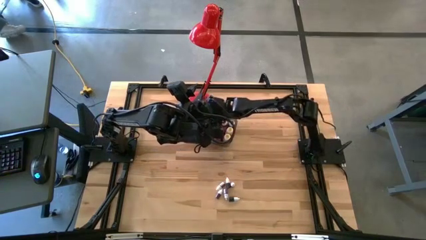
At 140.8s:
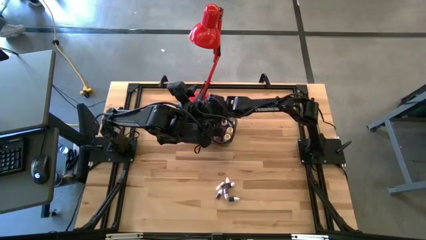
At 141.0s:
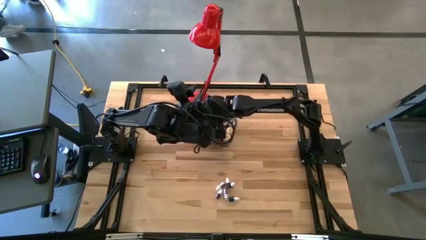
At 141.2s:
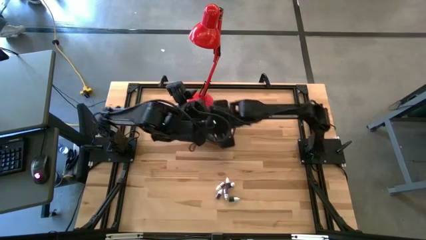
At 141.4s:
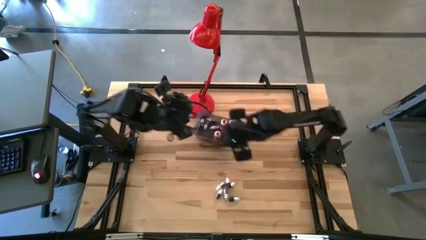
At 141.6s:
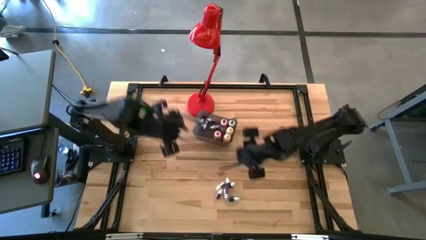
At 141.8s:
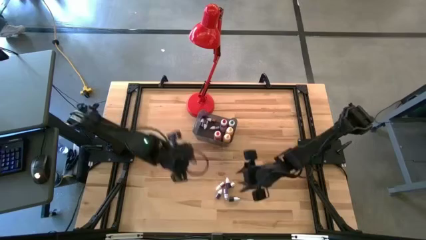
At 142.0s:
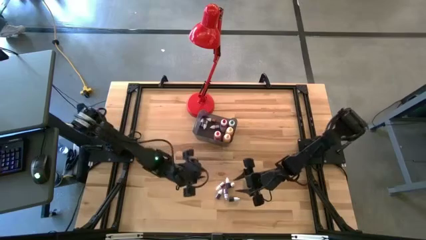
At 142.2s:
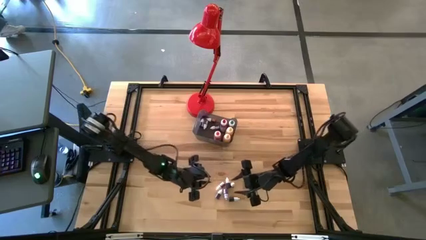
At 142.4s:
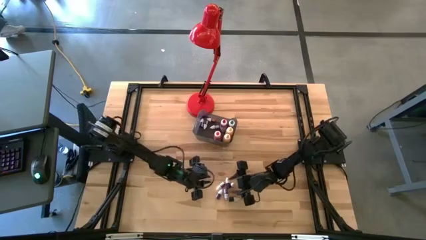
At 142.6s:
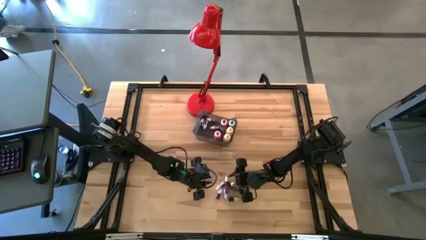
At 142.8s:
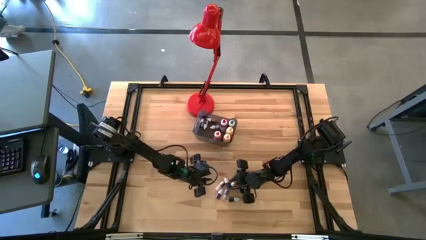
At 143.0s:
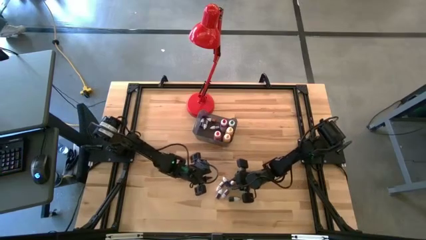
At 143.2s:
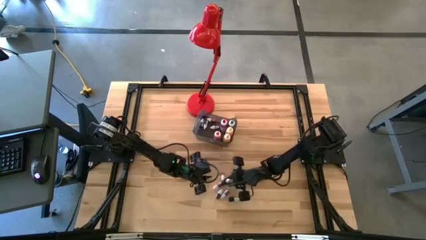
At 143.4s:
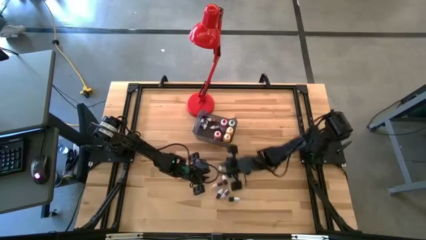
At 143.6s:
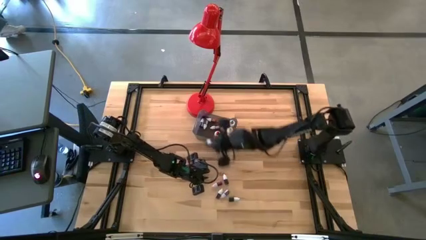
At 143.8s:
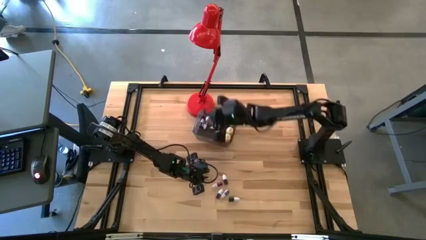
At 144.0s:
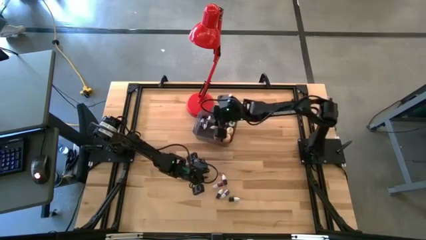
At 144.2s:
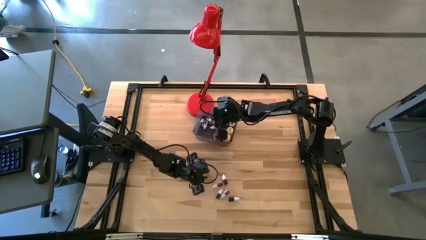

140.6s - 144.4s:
Task: Pick & Place food coloring
Put the small blue food coloring bottle into the black bin

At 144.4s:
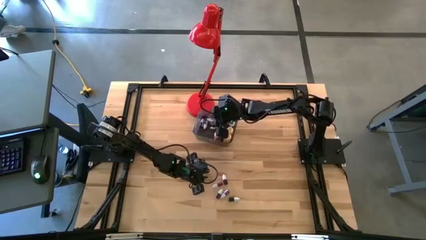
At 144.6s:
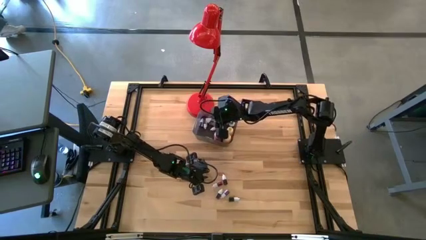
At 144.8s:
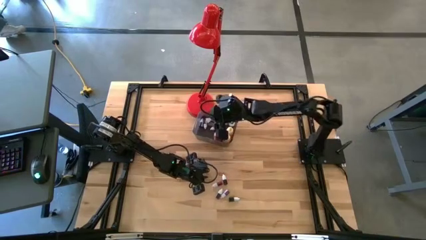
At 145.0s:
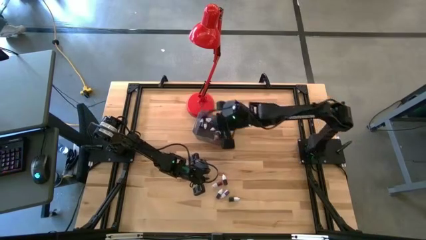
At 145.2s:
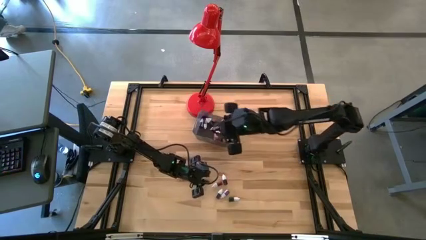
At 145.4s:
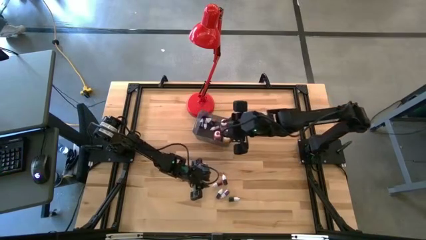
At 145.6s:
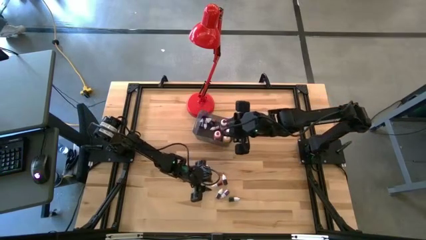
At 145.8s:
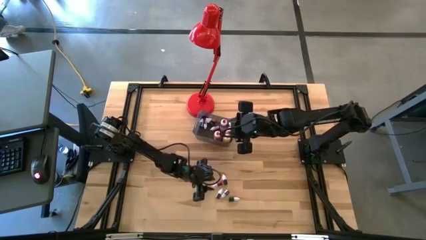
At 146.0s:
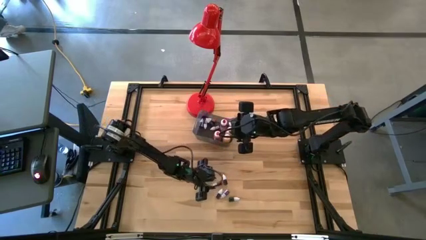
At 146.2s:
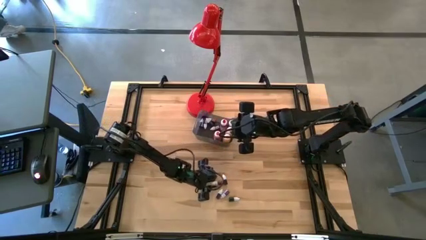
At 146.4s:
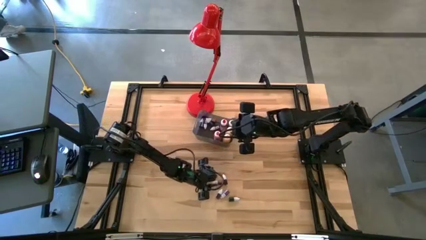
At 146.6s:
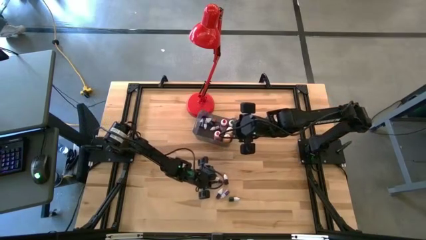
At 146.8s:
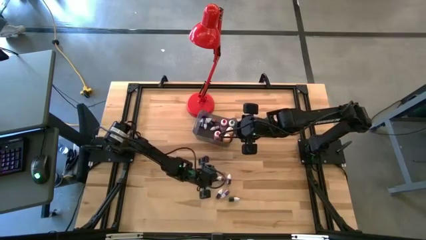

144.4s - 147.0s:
Put the left small red food coloring bottle into the black bin

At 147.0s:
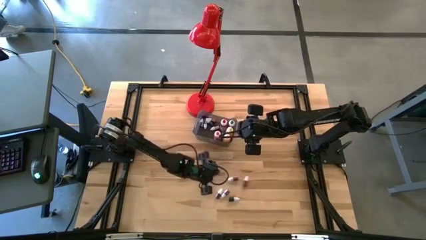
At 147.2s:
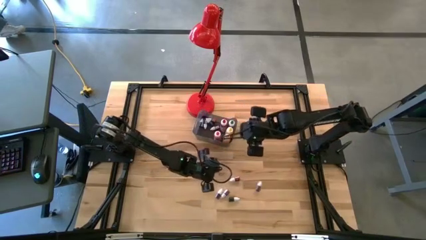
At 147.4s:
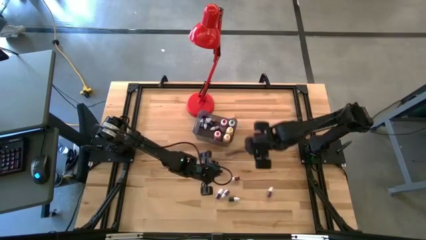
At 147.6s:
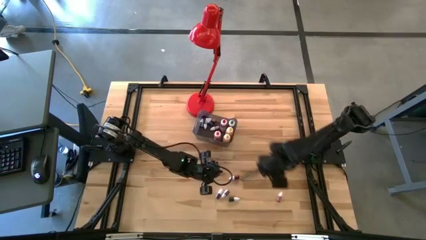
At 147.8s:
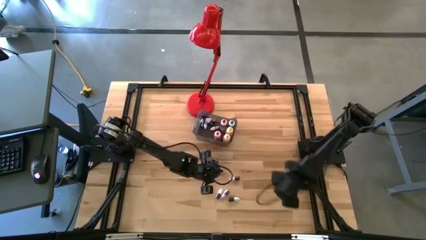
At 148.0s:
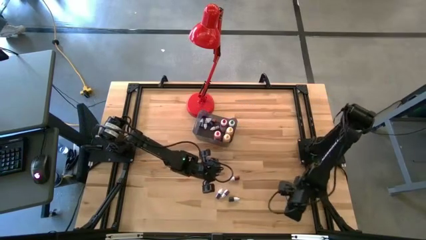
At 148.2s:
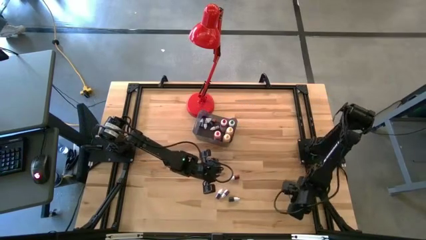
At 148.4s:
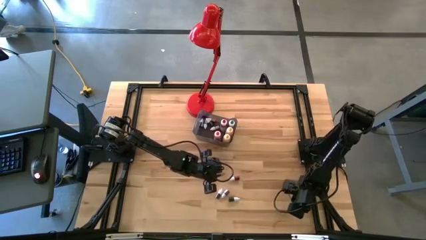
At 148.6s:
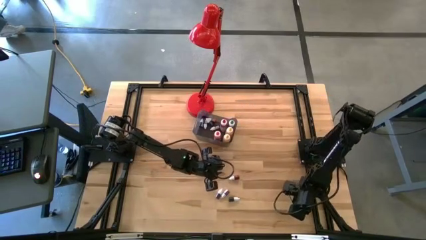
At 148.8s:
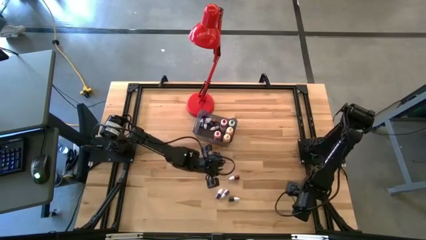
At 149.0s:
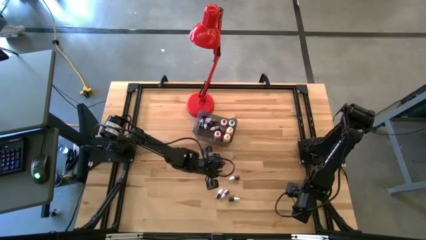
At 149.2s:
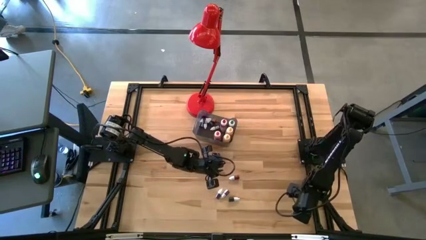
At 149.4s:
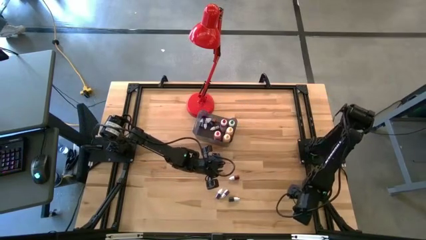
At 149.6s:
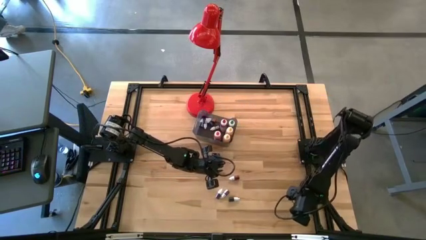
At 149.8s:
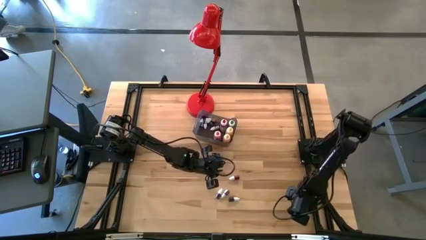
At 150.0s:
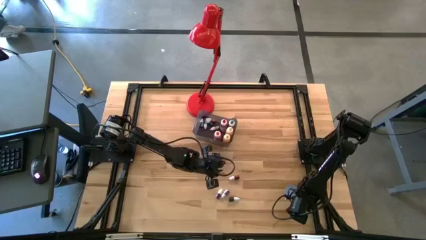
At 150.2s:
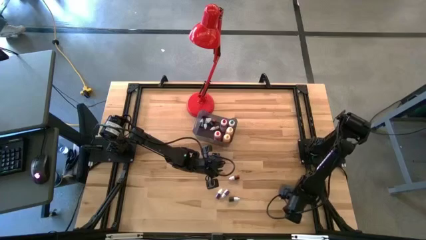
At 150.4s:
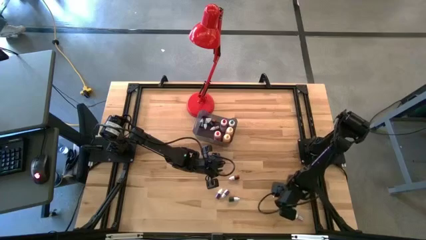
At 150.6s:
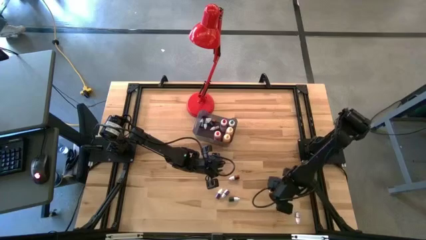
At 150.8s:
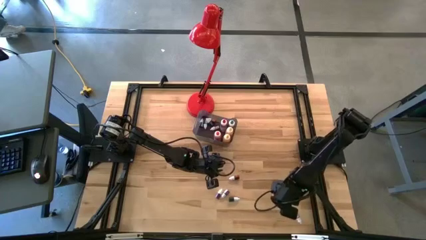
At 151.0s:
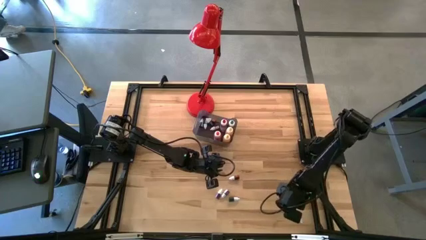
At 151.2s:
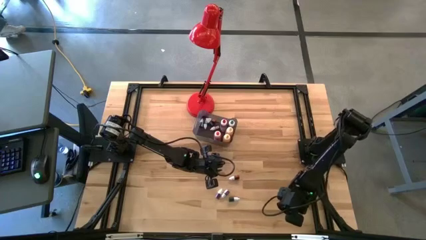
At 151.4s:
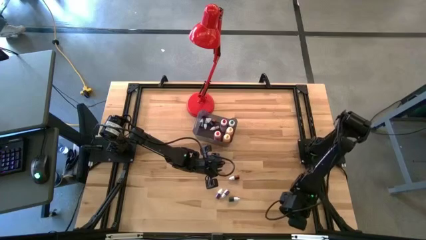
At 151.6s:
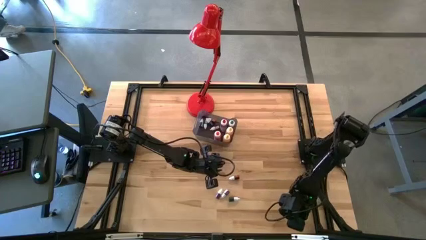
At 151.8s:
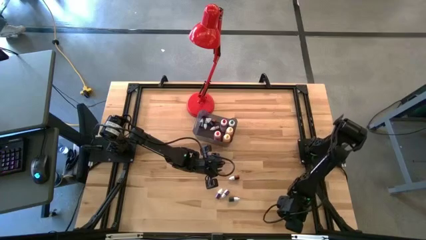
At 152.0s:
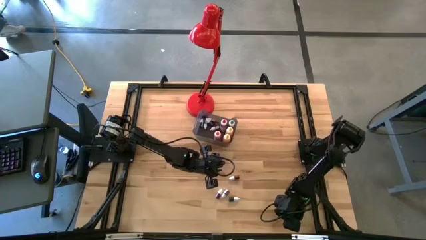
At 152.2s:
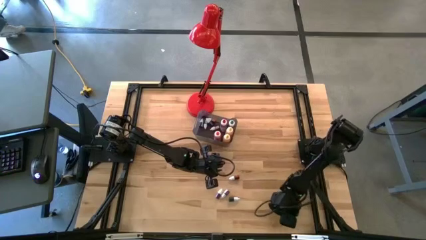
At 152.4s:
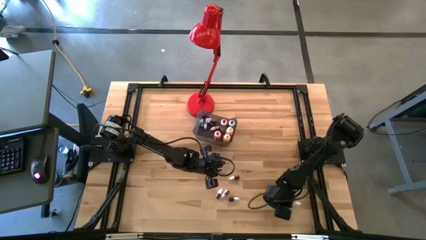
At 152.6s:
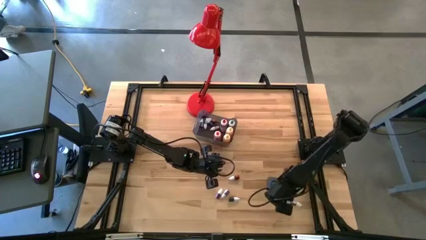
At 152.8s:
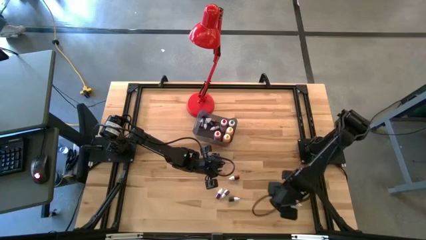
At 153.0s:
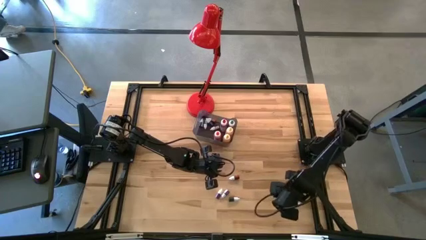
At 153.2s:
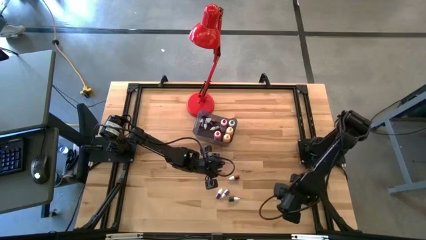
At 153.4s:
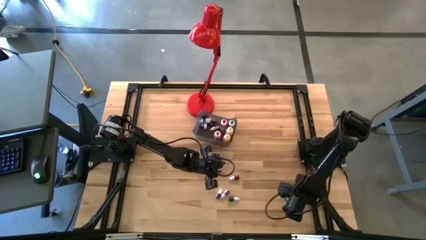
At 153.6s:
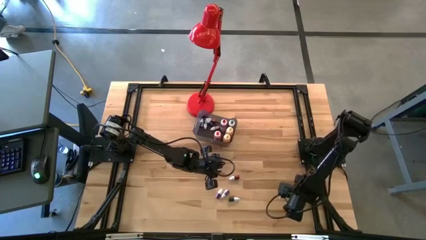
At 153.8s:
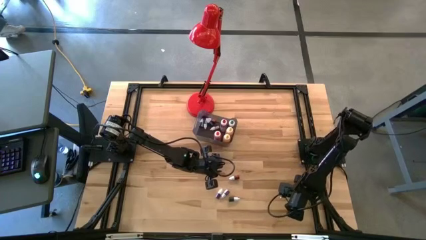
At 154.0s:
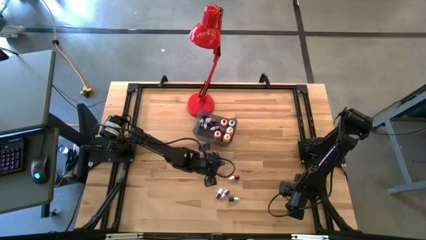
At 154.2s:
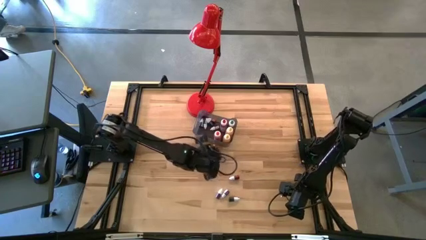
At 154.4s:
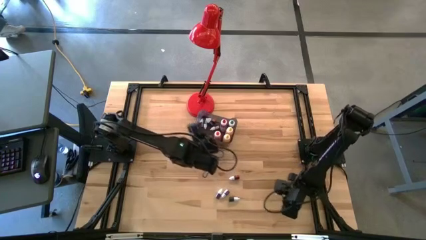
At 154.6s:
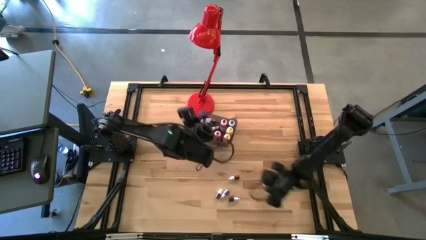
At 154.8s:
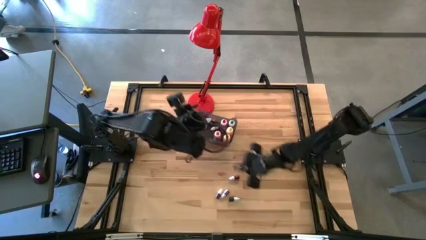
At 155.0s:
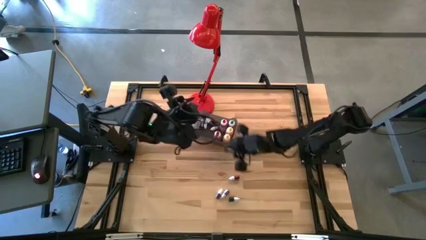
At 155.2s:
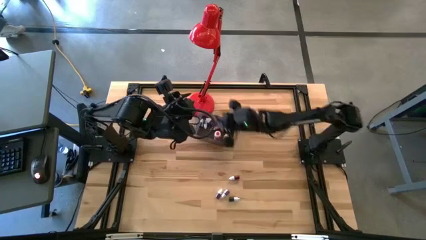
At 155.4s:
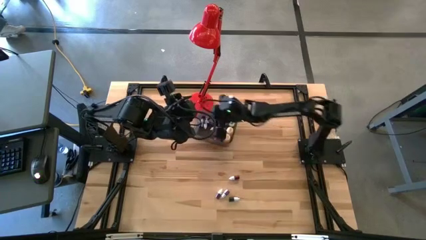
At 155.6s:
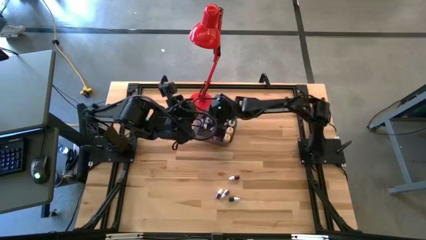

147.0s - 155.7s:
Put the right small red food coloring bottle into the black bin

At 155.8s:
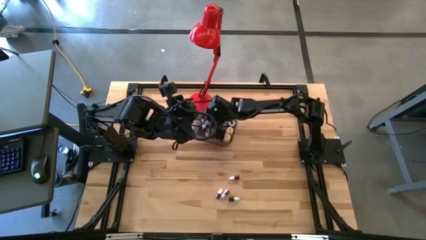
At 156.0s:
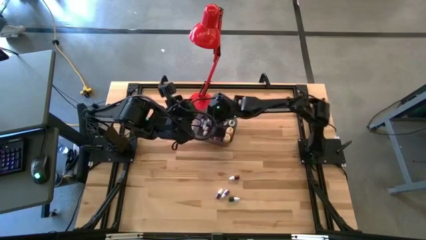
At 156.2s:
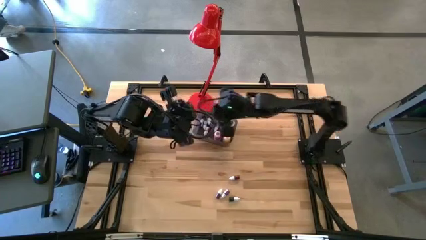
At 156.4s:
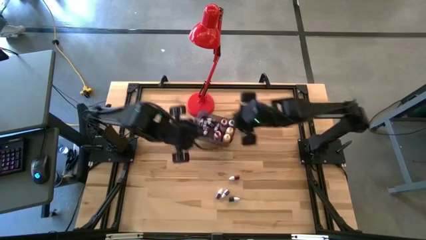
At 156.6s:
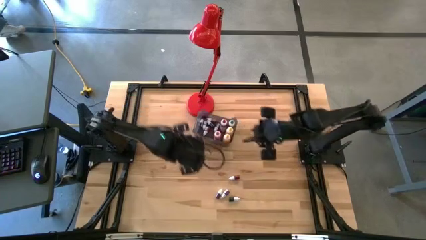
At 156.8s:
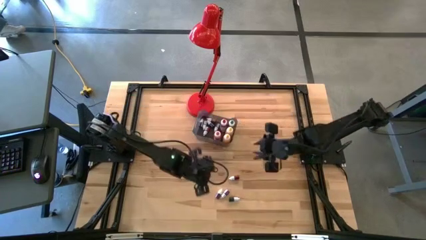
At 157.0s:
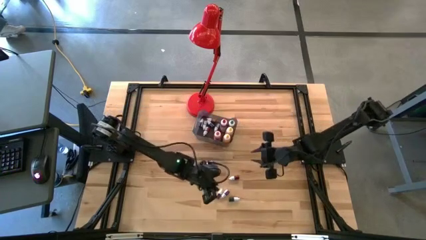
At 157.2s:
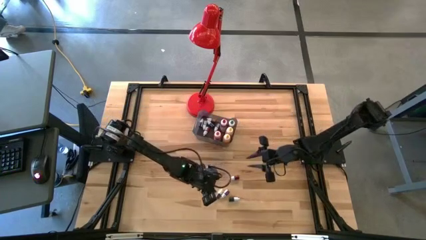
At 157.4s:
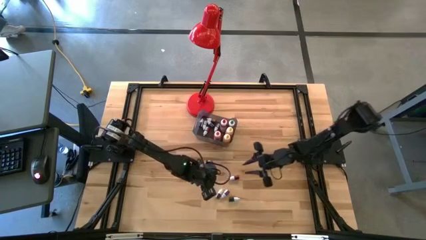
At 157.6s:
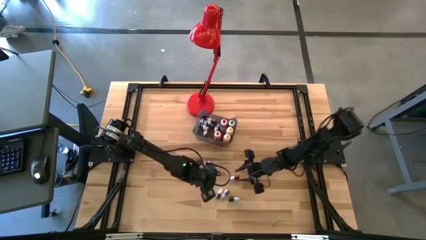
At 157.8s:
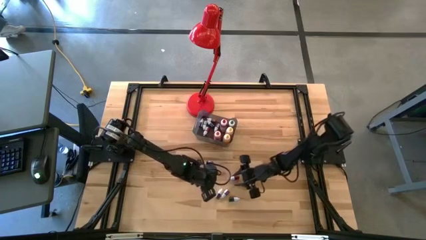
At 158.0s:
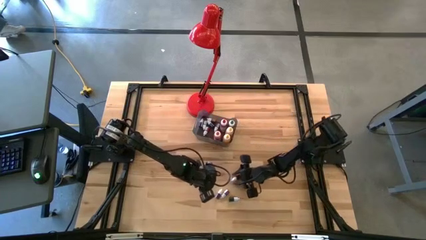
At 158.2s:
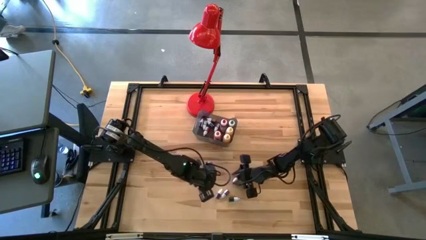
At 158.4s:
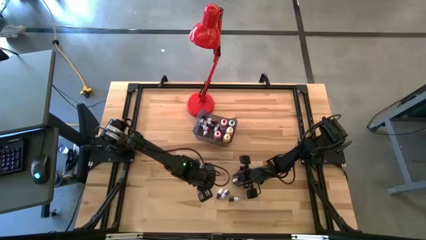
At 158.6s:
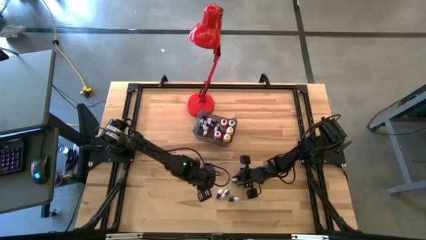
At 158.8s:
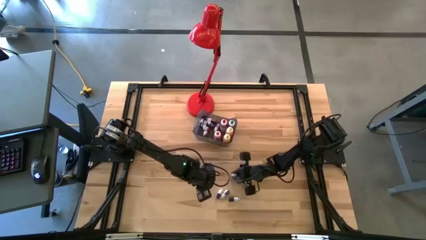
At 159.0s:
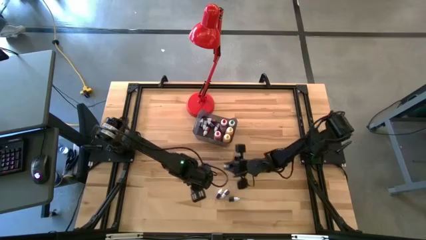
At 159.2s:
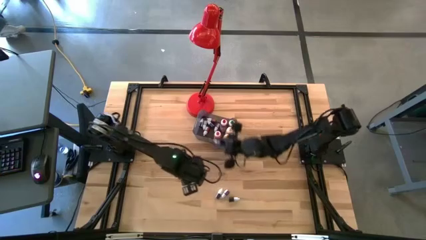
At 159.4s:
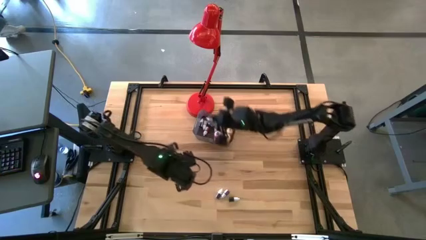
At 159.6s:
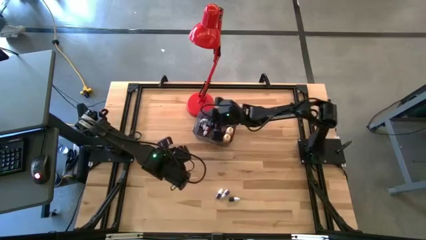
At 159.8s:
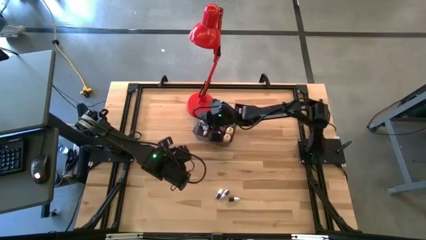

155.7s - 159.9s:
Put the small red food coloring bottle into the black bin
